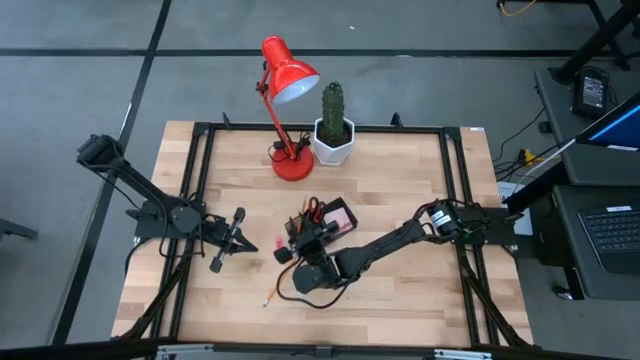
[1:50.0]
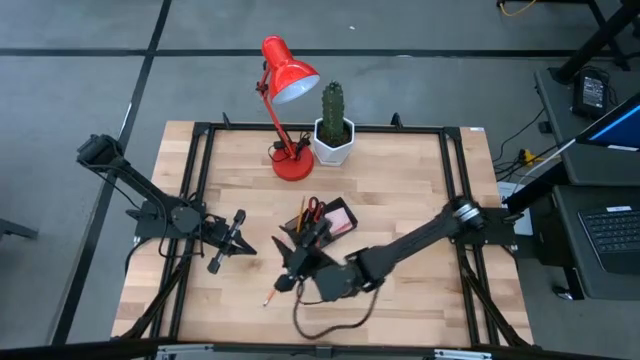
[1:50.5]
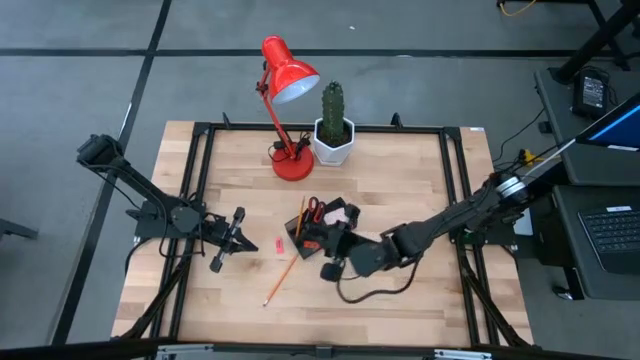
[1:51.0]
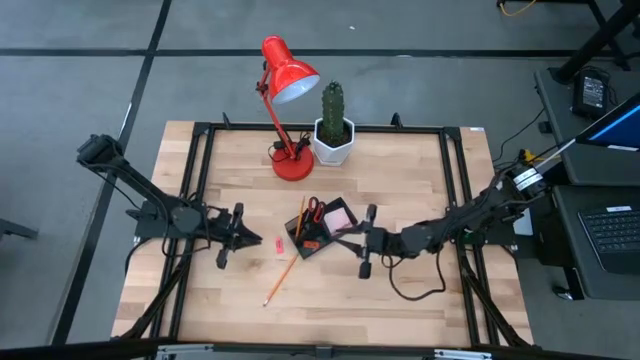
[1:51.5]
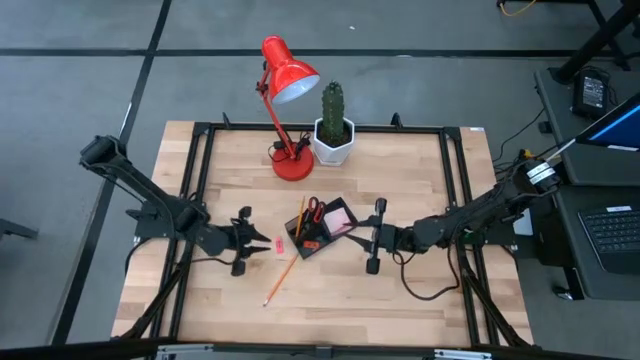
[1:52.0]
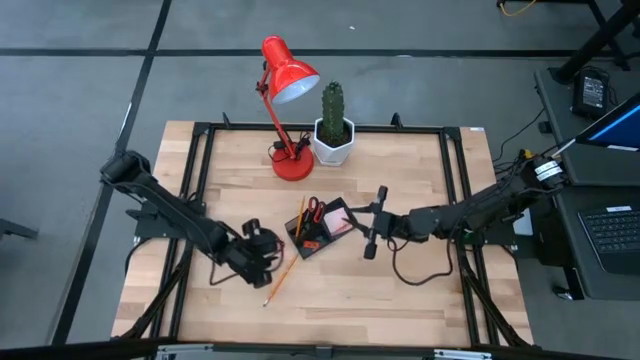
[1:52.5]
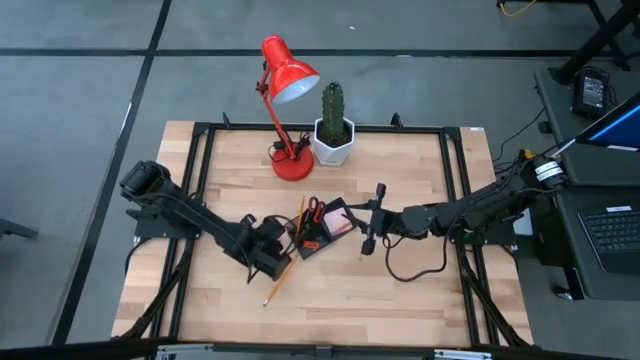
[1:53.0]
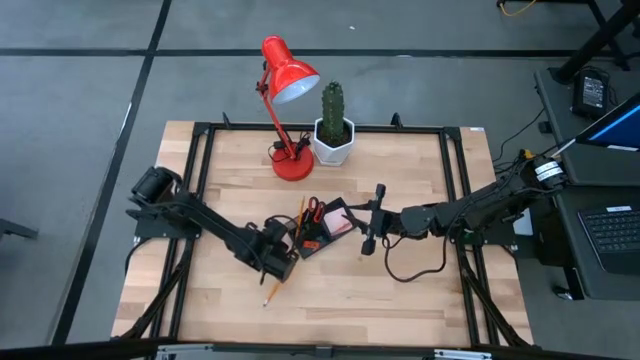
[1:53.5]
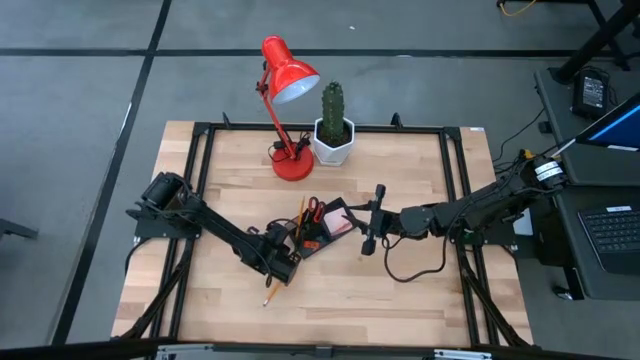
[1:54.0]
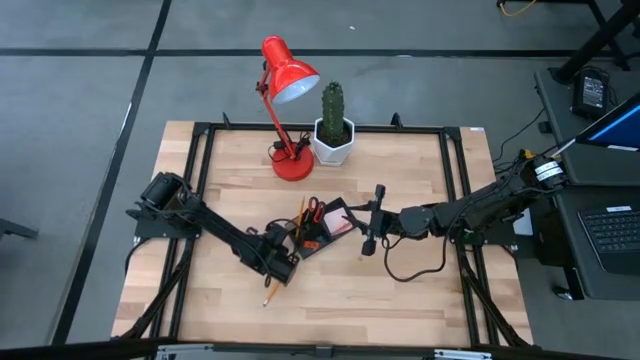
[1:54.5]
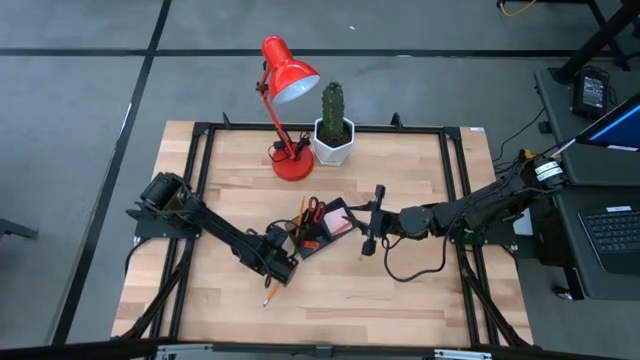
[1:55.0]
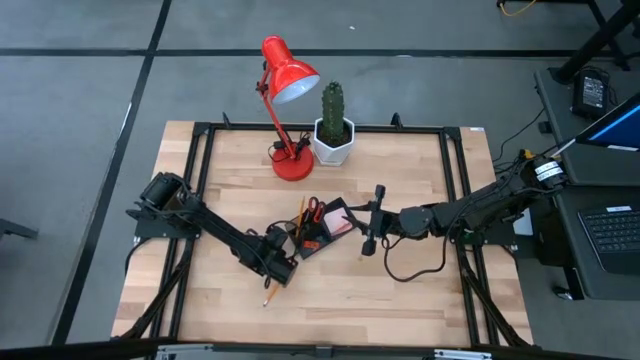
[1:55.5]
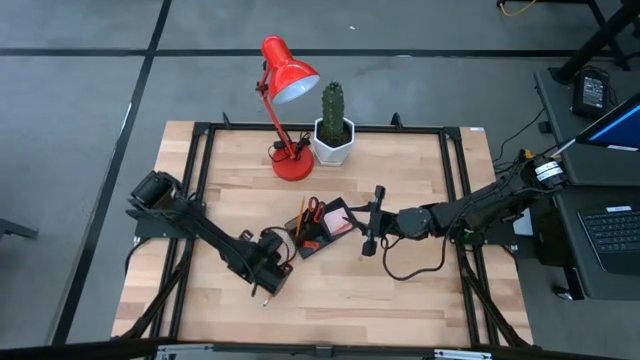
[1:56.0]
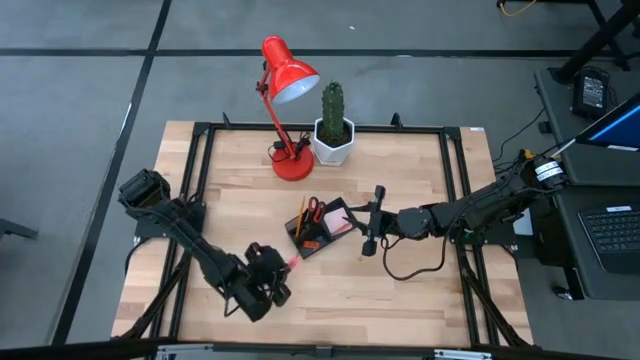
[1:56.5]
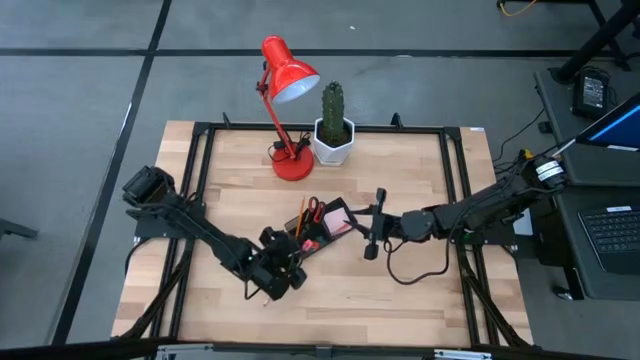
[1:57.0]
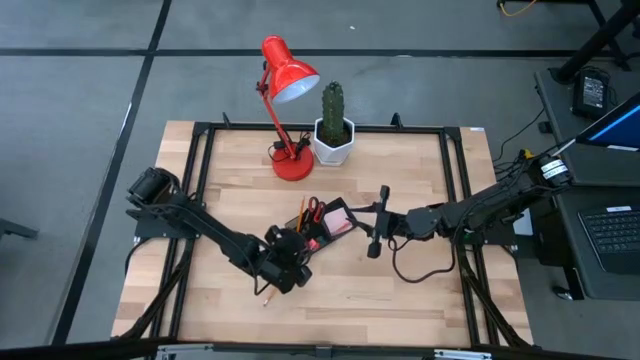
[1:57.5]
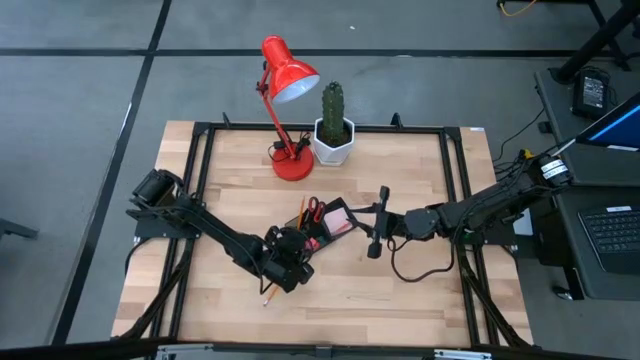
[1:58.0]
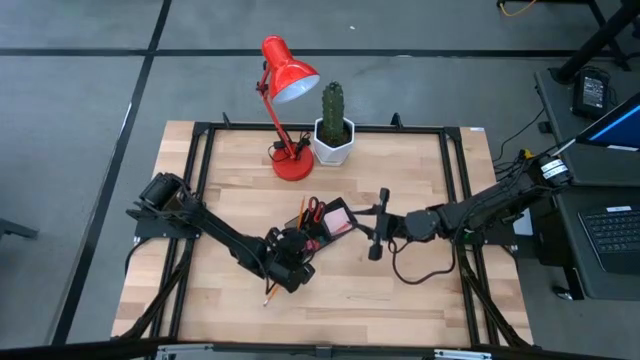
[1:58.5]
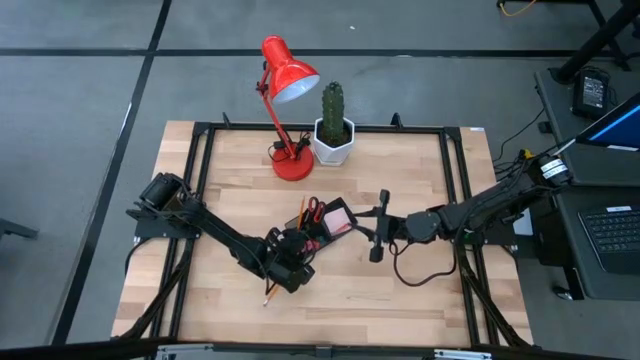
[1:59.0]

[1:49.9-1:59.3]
Task: Pick and place office supplies into organizer
Put the pink eraser into the black desk organizer

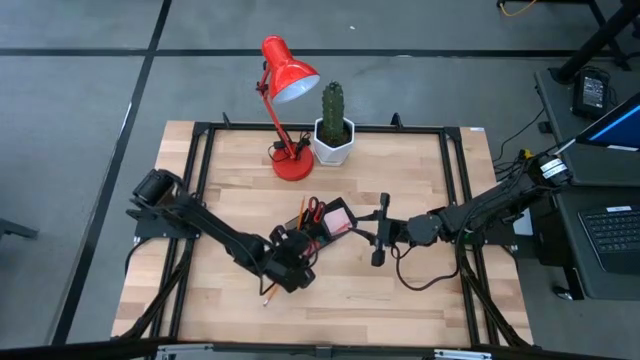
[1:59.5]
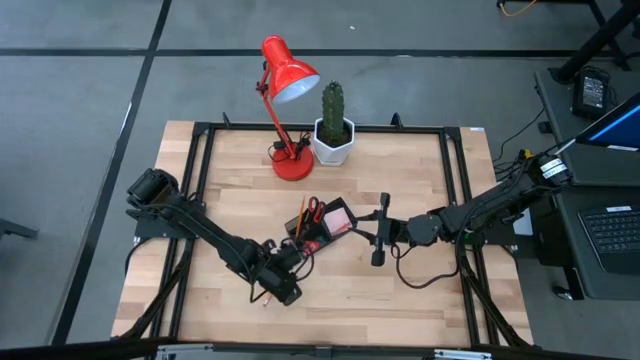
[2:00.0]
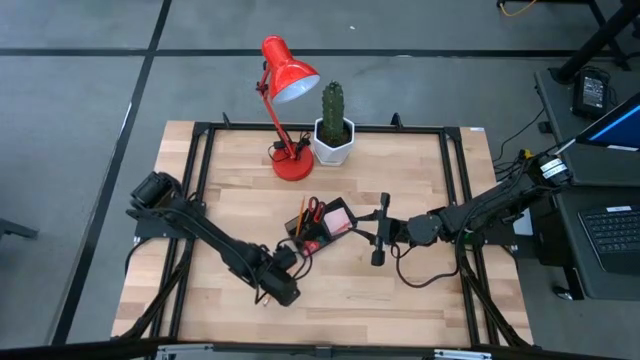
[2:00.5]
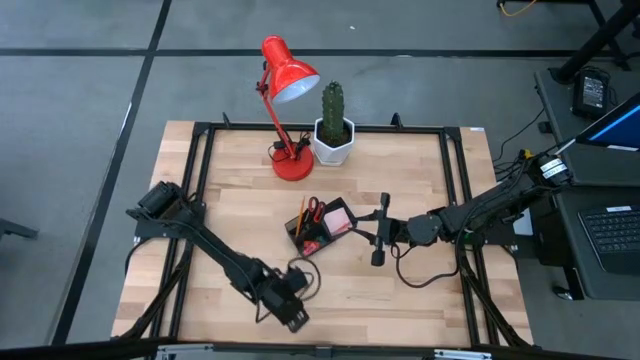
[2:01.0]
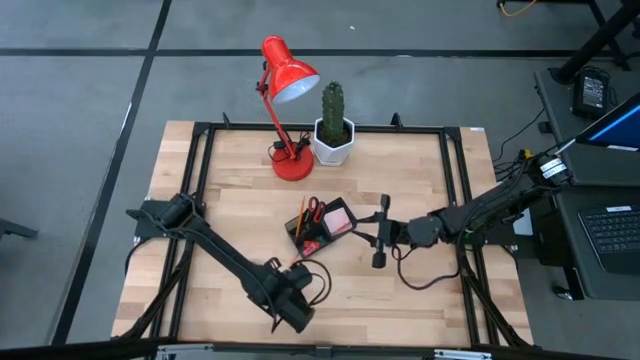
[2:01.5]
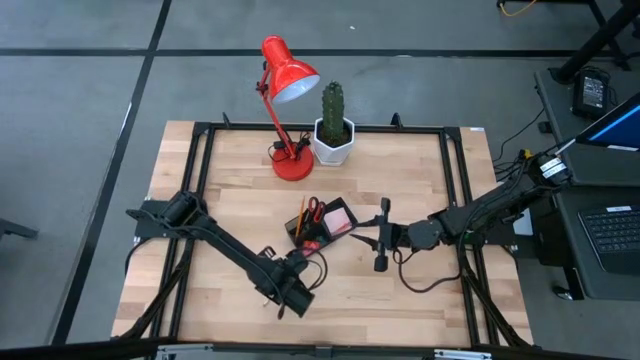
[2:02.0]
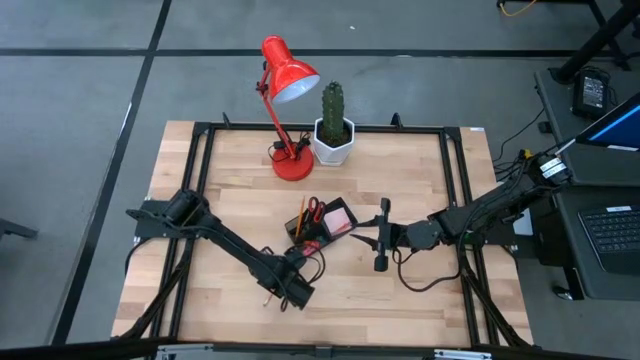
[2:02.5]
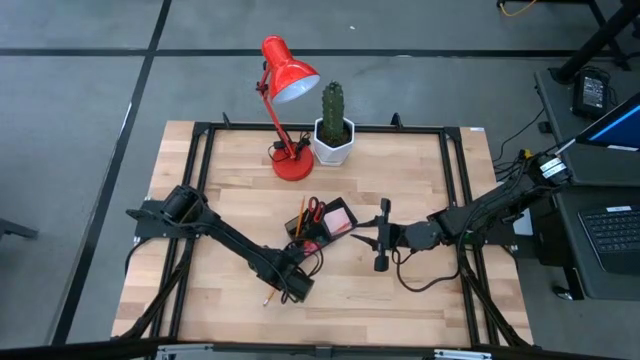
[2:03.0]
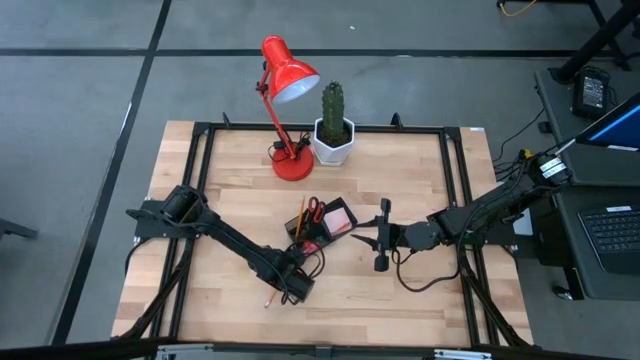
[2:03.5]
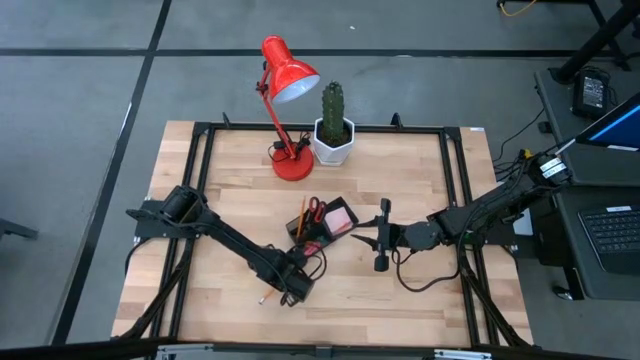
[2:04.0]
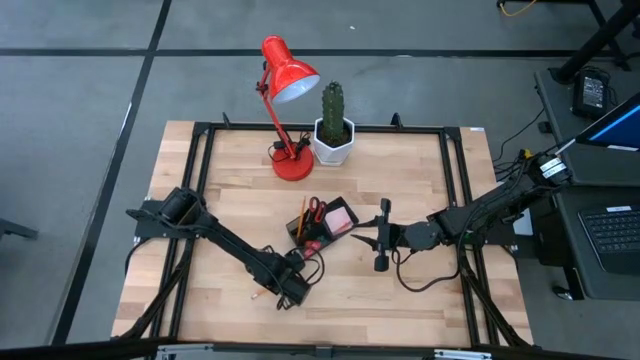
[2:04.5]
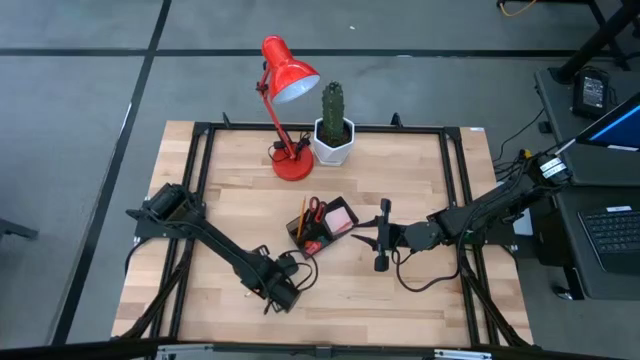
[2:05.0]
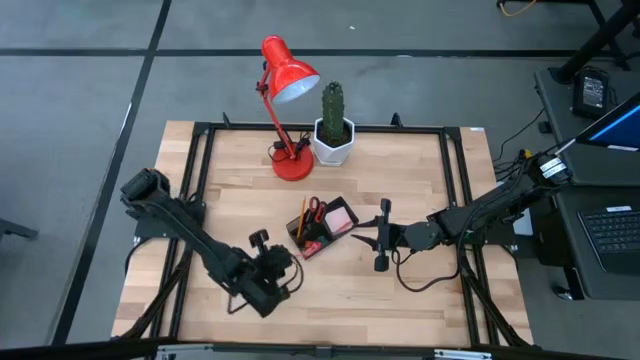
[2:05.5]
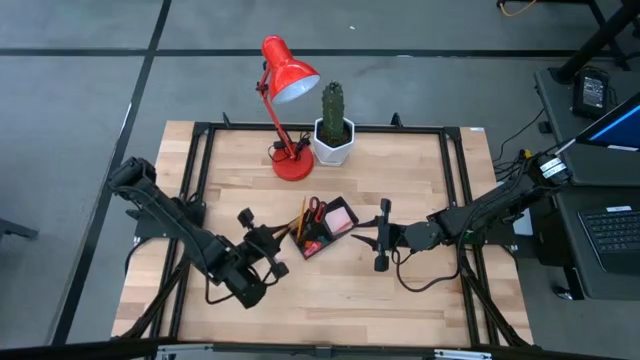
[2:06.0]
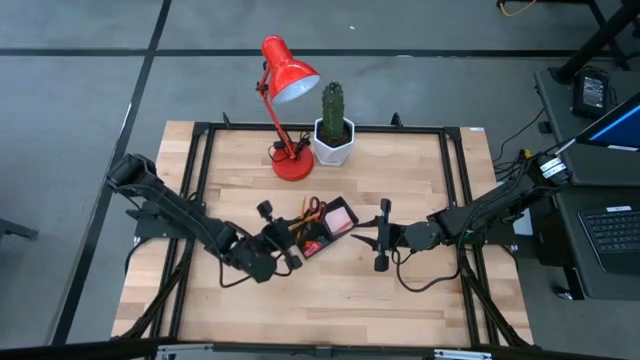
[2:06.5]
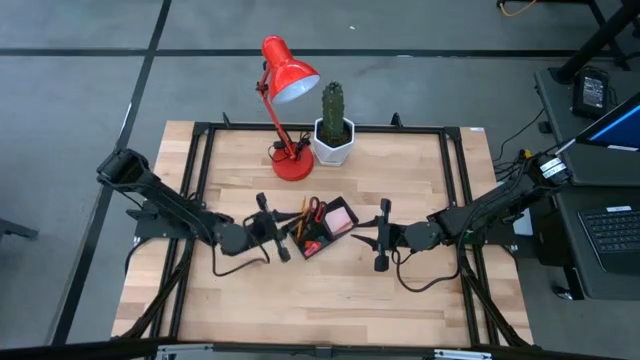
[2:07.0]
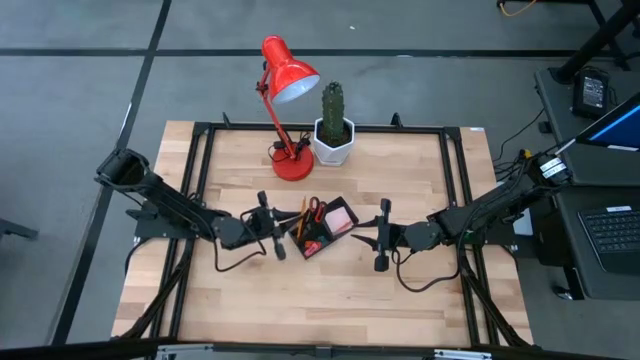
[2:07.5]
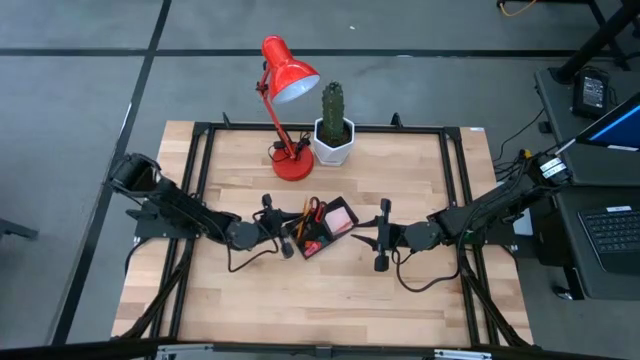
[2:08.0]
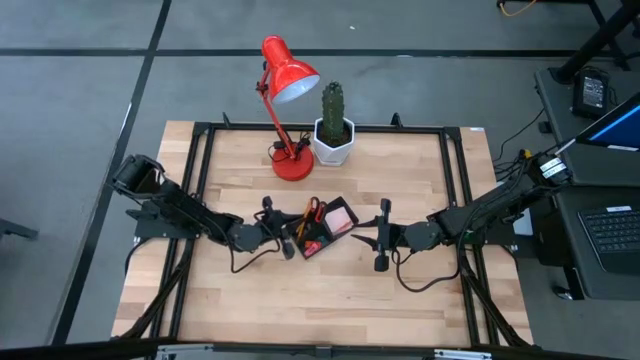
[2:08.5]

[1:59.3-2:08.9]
Put the orange pencil into the black desk organizer
